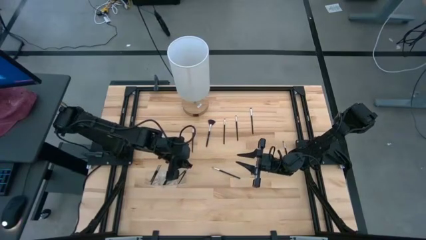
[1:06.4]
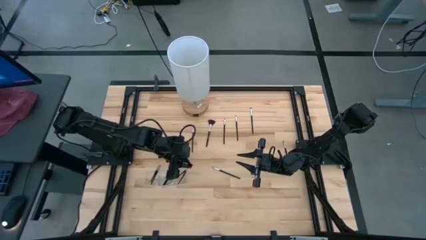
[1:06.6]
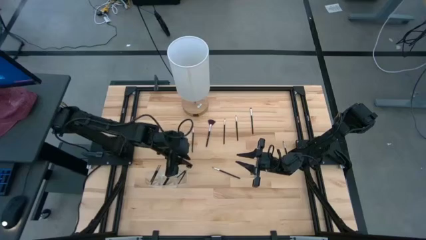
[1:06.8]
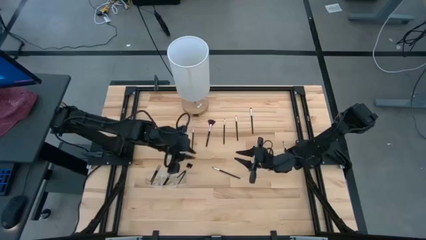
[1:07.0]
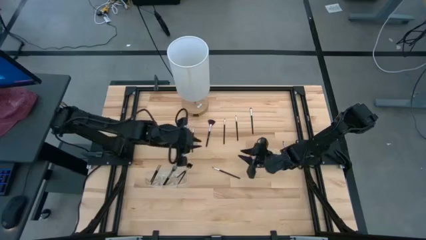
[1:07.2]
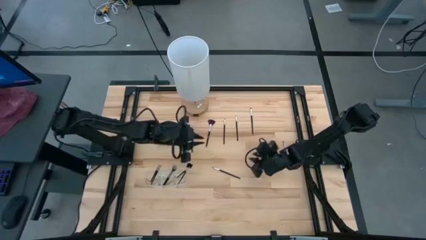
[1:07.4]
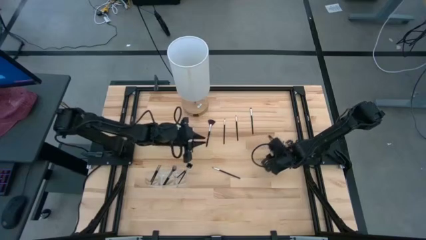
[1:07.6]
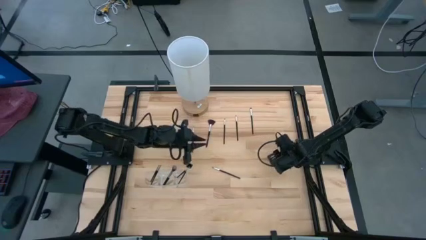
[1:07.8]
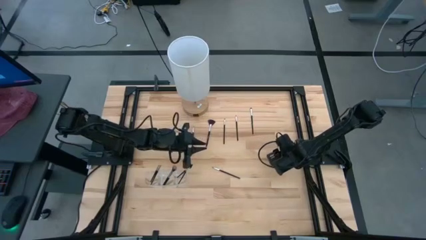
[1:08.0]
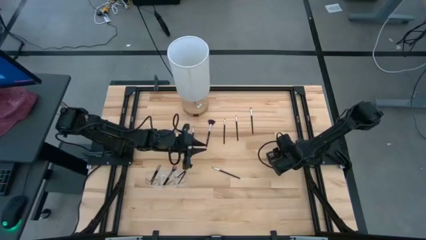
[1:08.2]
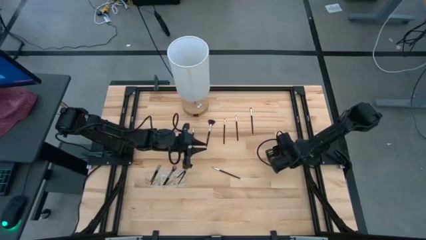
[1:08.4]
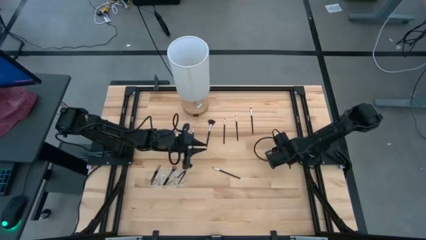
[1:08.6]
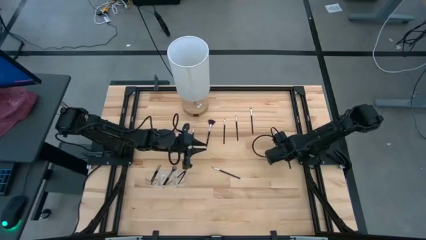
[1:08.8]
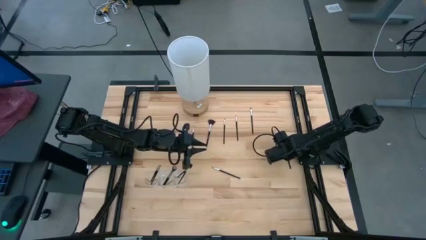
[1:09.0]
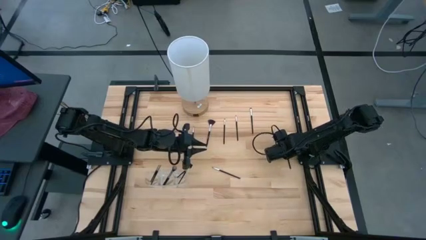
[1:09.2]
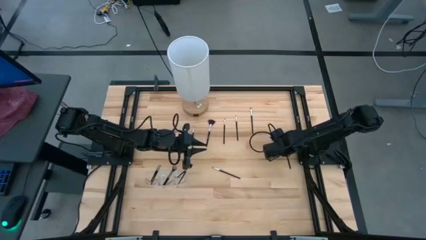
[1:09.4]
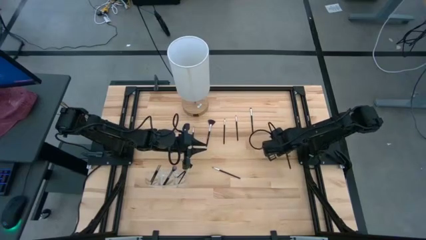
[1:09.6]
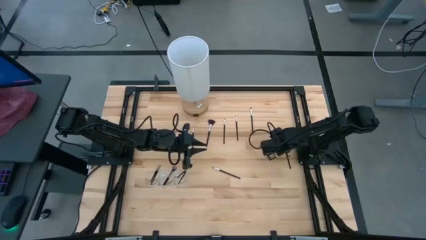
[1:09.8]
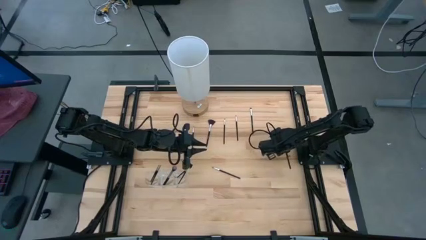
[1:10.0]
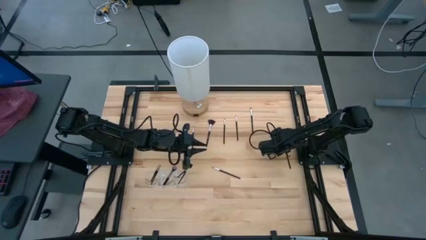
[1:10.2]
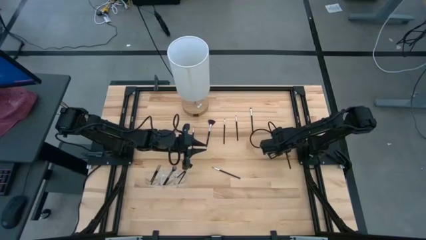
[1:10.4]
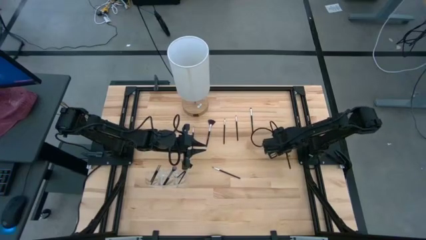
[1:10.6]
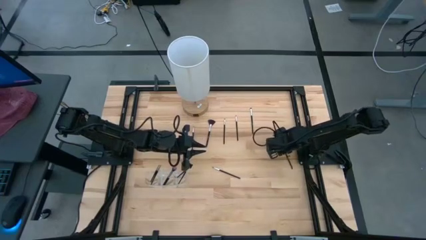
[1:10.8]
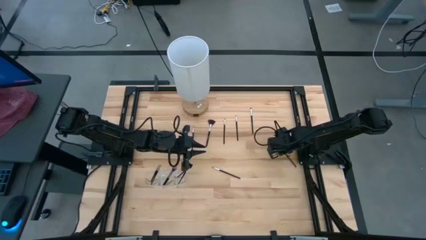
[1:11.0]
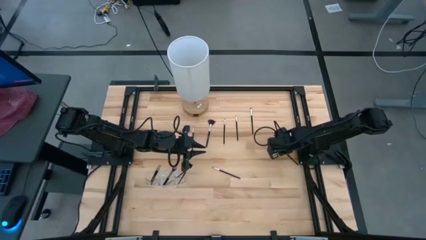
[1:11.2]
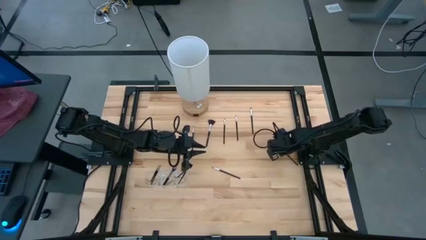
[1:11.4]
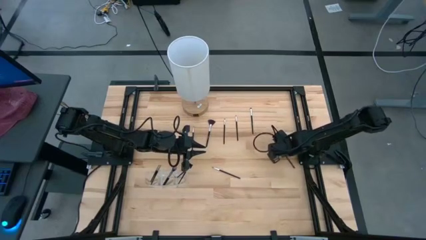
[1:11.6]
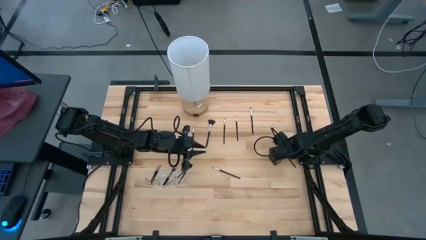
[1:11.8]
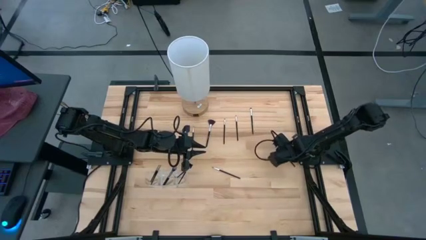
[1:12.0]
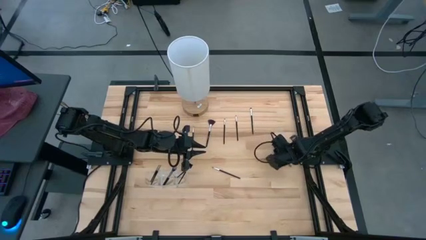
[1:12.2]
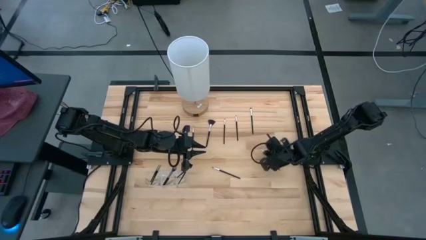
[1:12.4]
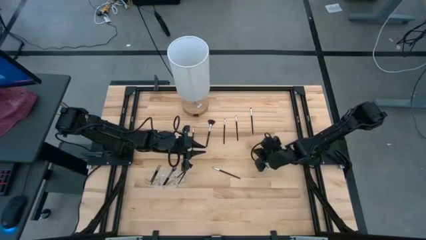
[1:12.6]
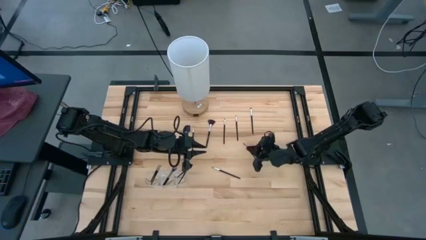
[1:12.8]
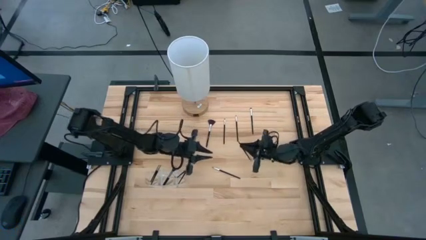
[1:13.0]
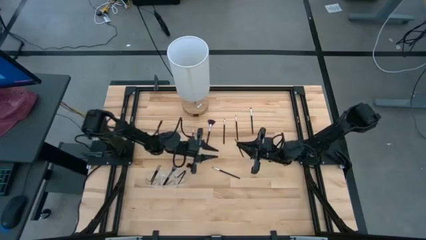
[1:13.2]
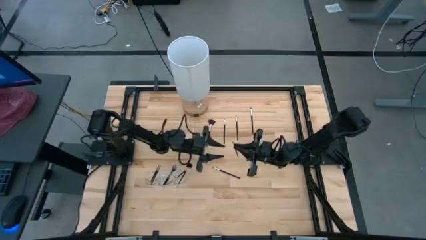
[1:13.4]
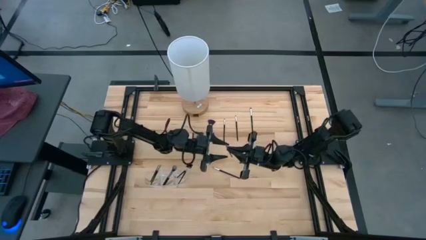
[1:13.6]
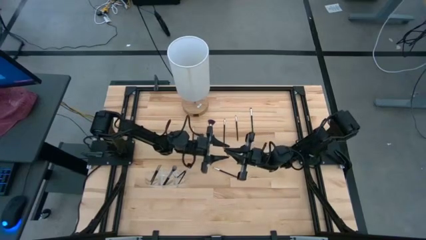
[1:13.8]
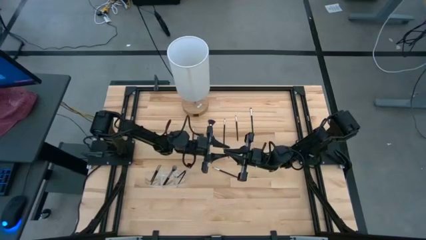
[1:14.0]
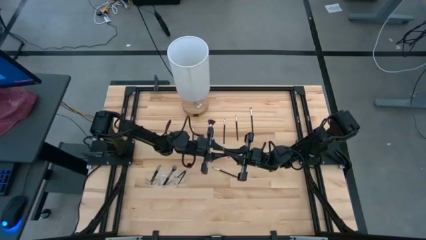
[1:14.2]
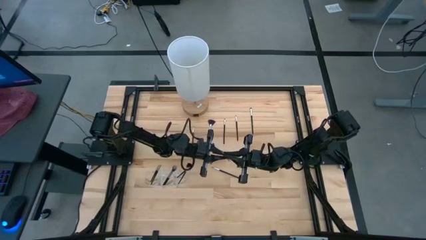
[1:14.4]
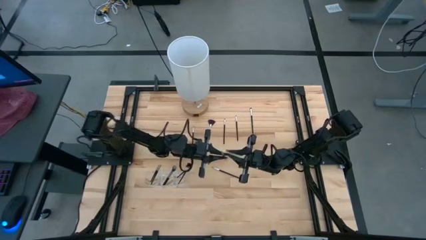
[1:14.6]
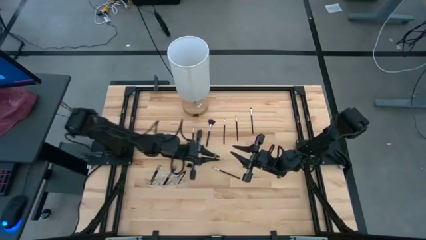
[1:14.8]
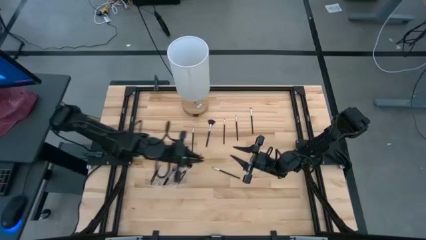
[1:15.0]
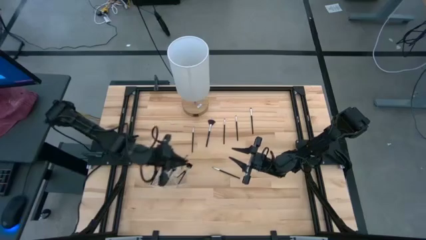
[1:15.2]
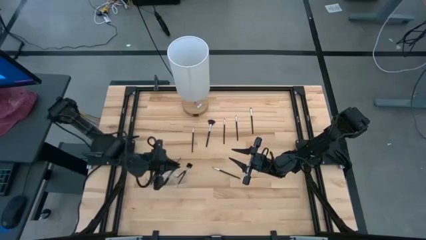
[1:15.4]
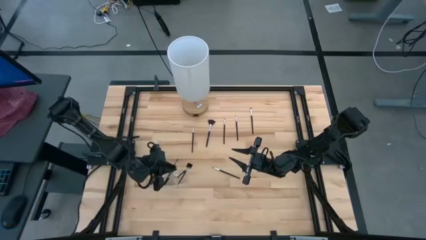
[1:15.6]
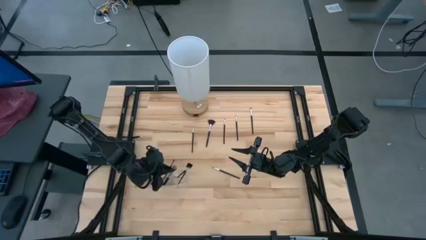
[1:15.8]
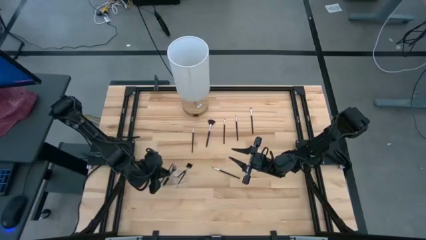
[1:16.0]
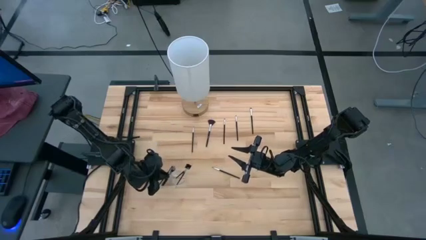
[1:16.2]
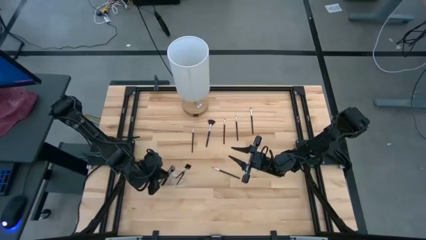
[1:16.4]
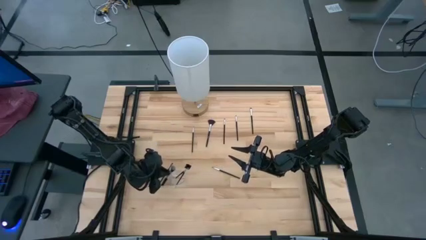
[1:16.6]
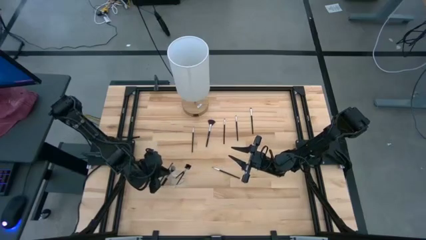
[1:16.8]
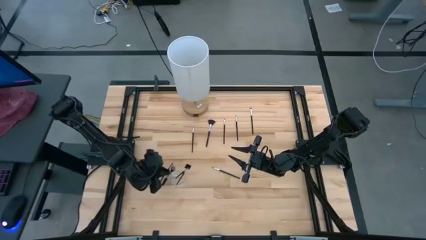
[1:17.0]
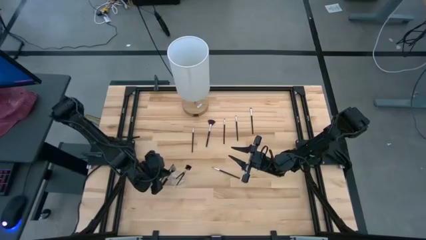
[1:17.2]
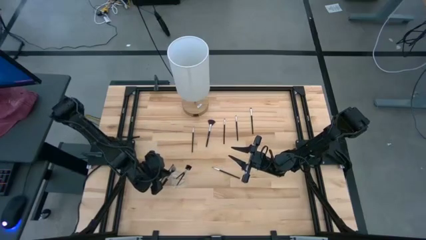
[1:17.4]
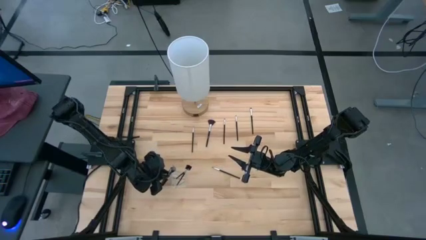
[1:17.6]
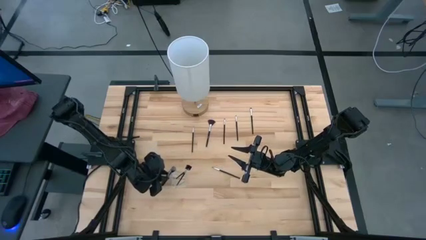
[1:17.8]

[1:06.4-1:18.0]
Task: Put items in baskets/containers
Put the foundation brush in the transparent organizer

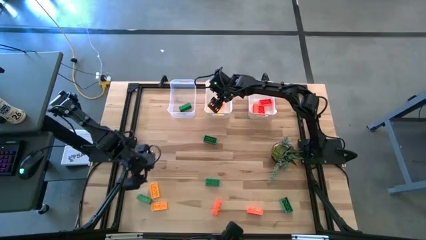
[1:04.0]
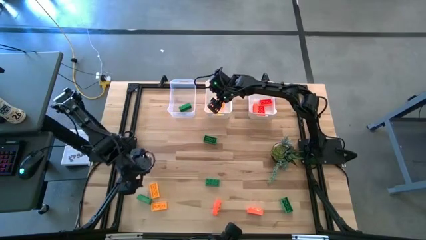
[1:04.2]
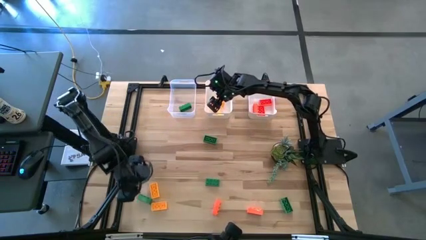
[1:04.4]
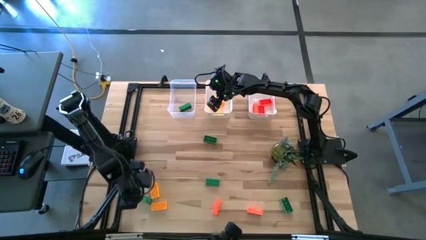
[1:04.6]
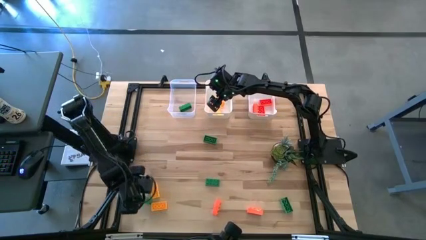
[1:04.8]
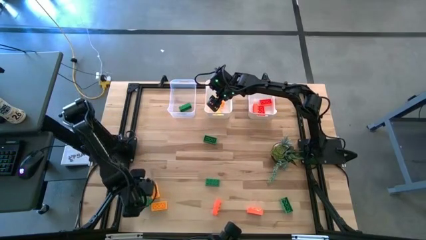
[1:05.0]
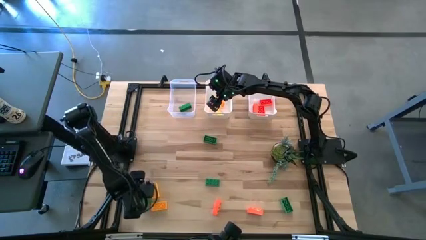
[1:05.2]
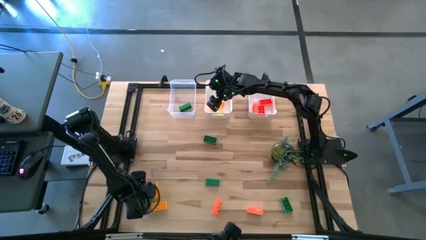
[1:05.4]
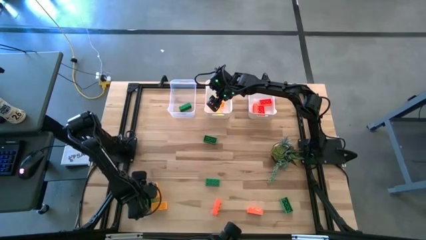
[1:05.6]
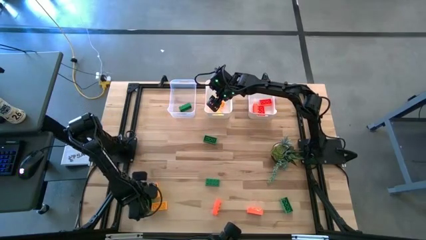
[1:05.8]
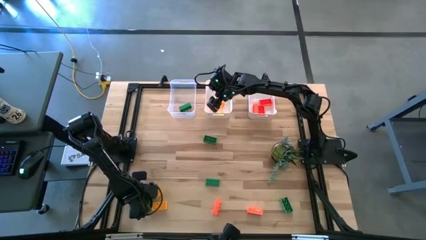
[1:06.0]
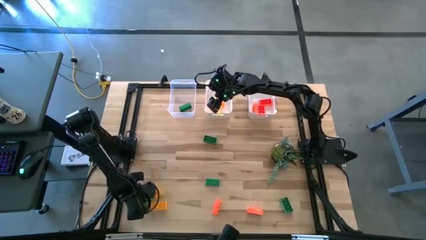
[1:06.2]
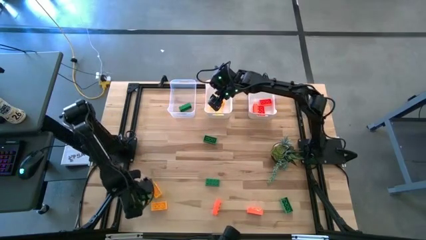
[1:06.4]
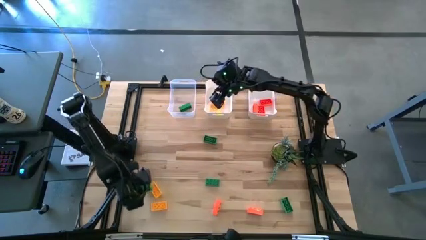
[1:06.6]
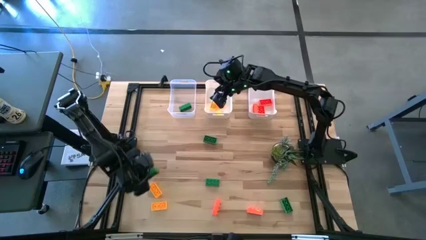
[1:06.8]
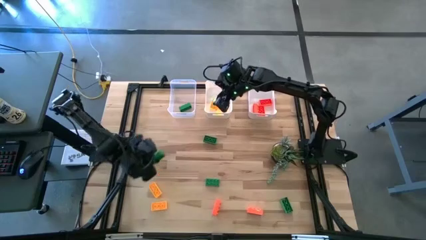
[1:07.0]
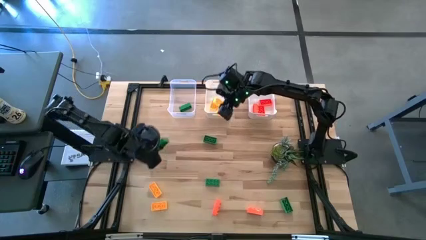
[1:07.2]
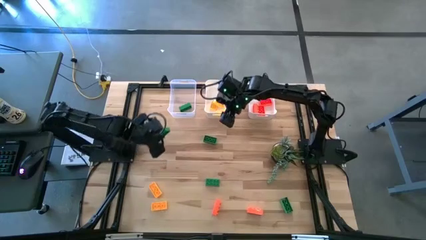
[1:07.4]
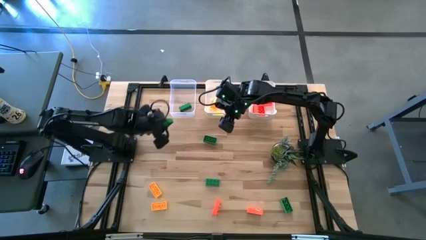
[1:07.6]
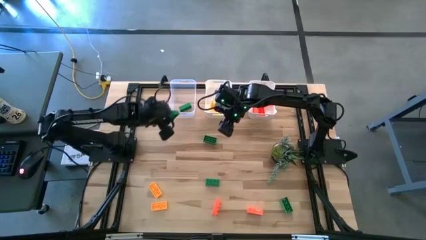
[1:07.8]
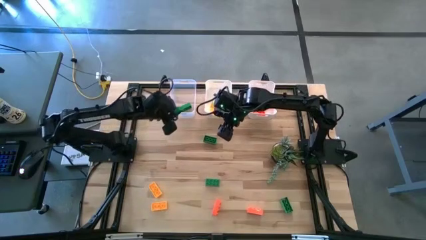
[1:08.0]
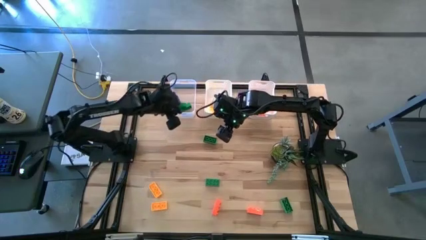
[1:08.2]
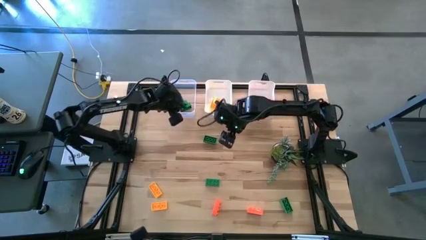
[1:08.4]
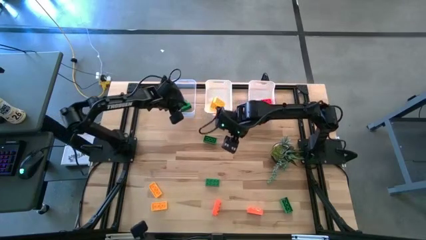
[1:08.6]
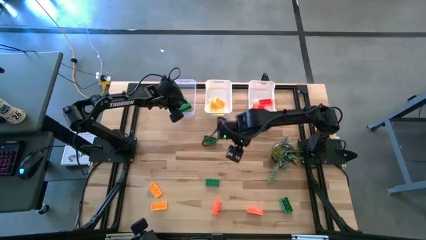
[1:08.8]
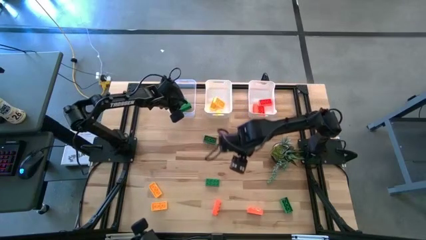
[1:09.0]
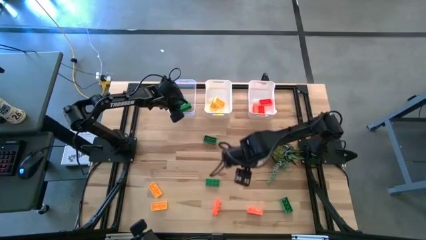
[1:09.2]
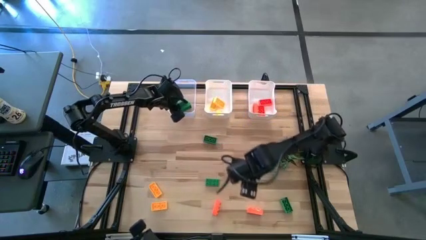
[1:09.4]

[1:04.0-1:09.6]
Task: Sort & place blocks by color
Put the green game piece into the transparent bin
